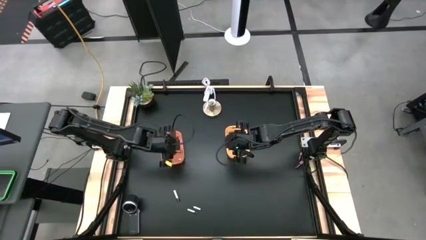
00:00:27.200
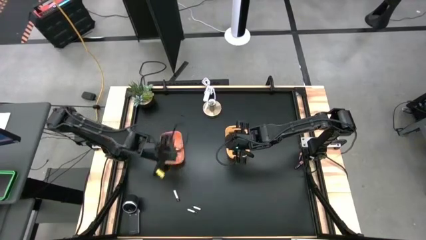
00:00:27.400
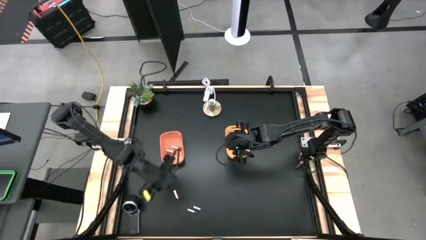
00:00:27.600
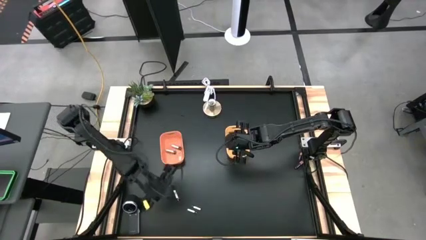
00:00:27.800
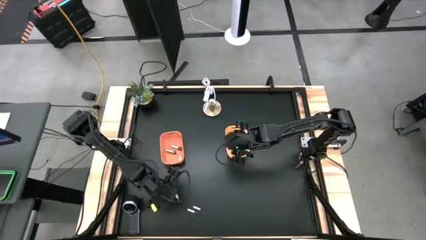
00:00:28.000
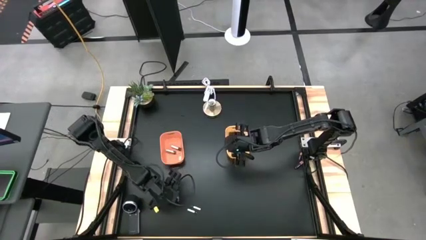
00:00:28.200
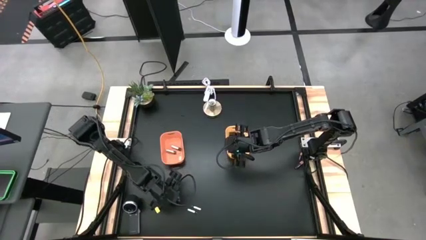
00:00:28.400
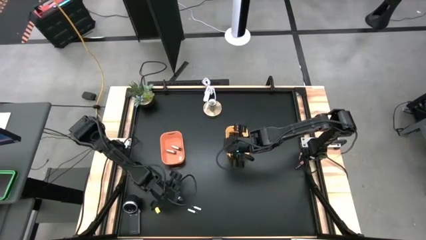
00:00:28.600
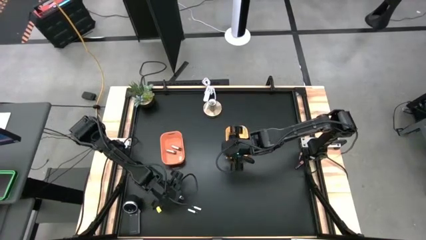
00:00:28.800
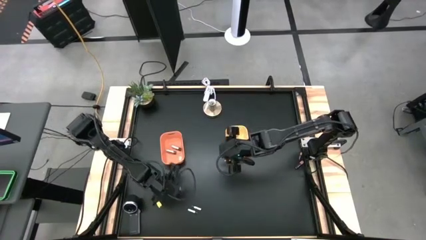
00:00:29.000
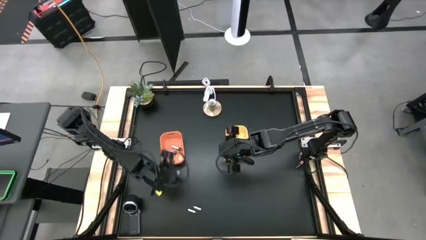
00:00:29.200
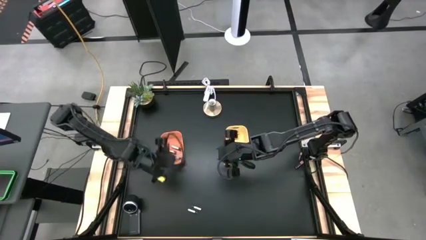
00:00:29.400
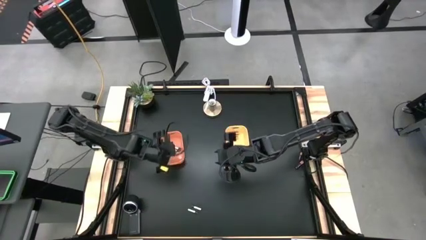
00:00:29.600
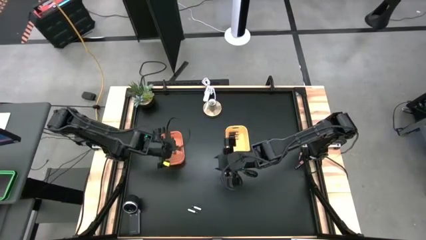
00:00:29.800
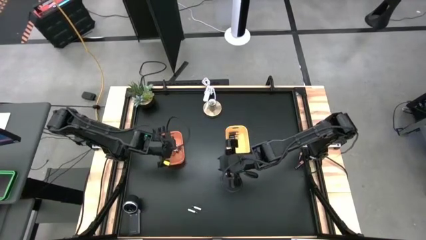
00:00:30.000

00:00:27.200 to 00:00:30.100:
Task: Sort batteries
Put the silver battery into the orange bin

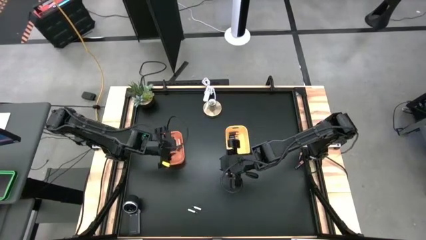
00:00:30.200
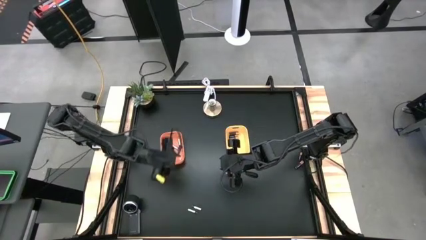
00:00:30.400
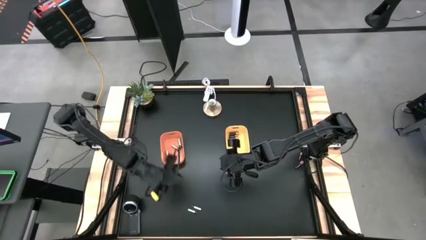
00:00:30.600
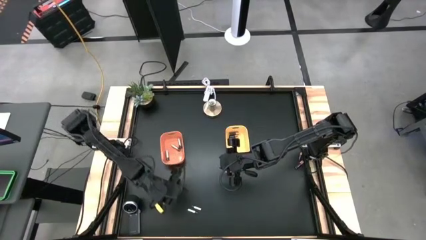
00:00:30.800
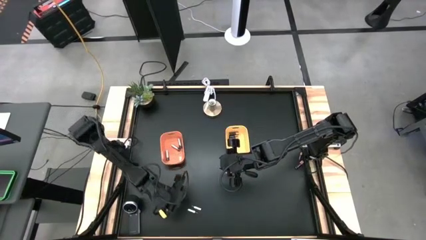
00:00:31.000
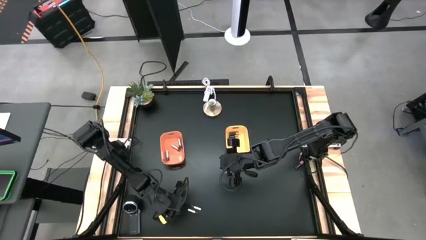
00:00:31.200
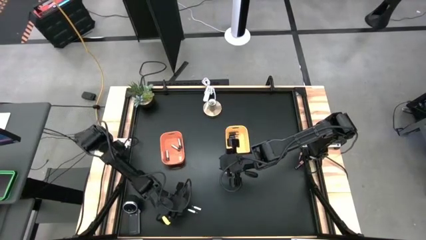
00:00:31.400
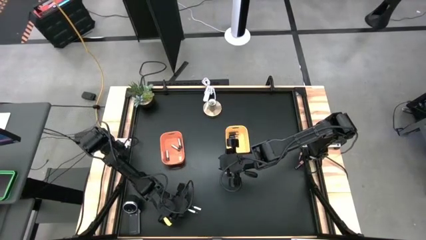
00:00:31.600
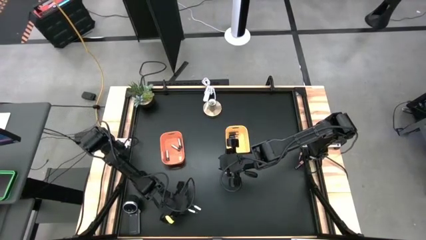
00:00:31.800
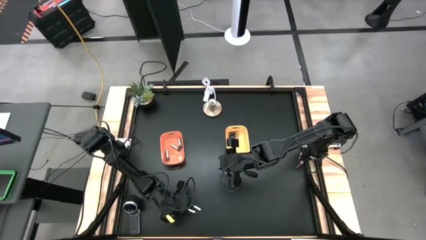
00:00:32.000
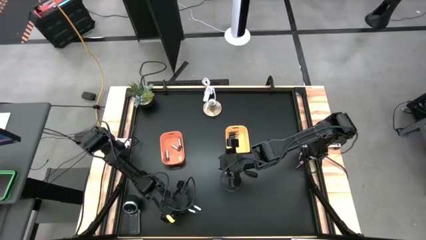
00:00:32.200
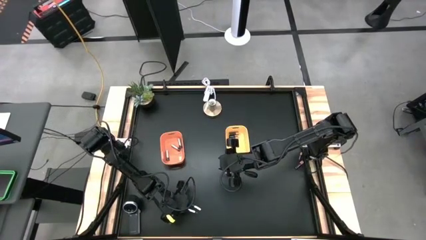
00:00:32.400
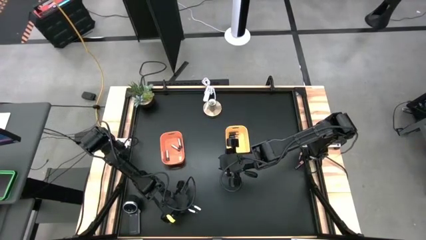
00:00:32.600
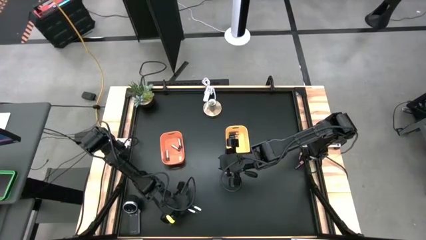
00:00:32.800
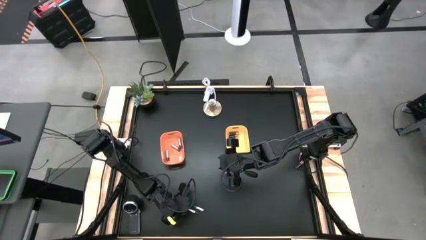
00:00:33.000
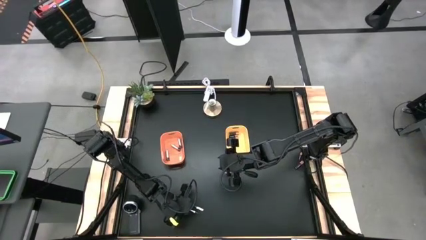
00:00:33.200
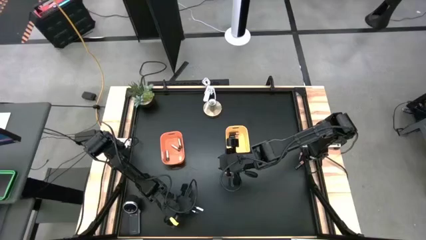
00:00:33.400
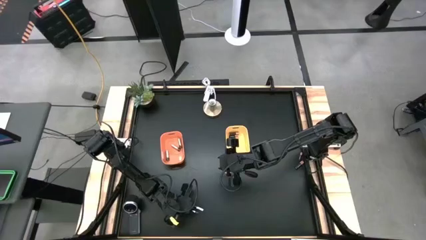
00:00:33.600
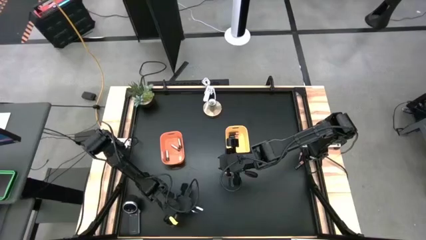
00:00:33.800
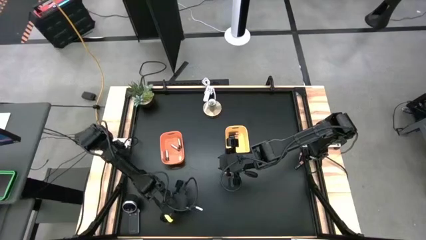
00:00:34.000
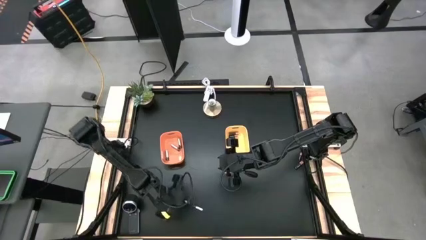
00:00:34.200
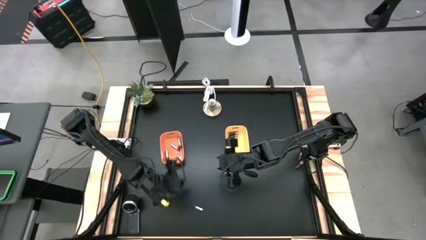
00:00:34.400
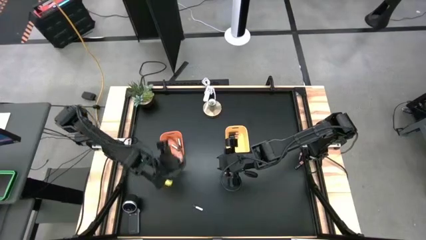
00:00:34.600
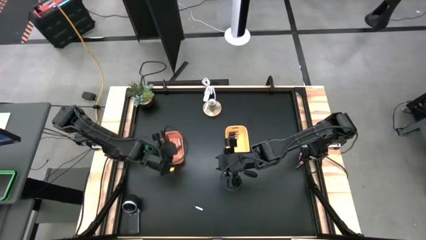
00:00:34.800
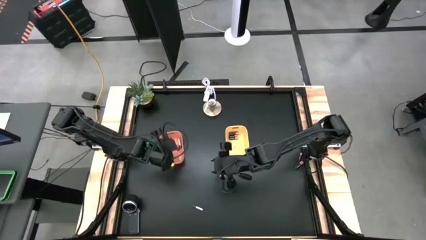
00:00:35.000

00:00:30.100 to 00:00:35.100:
Put the silver battery into the orange bin

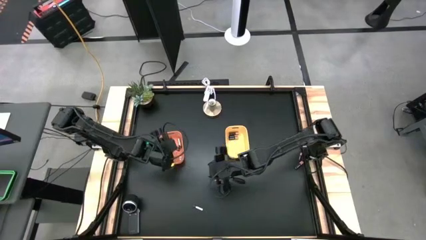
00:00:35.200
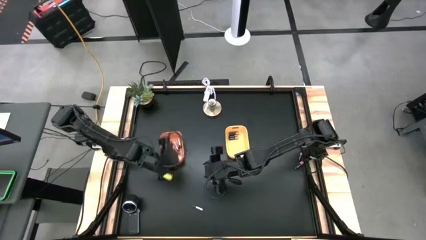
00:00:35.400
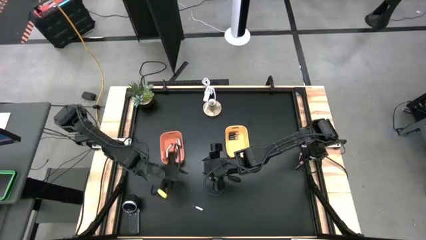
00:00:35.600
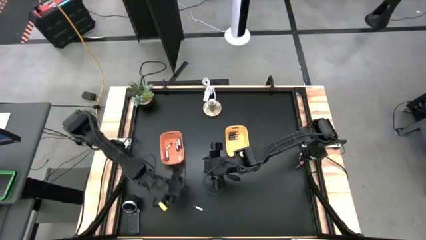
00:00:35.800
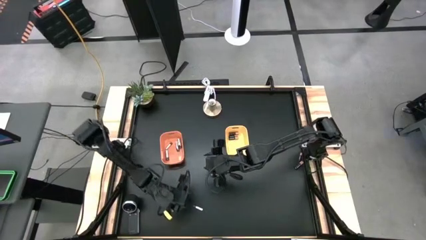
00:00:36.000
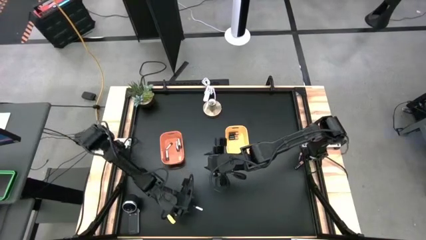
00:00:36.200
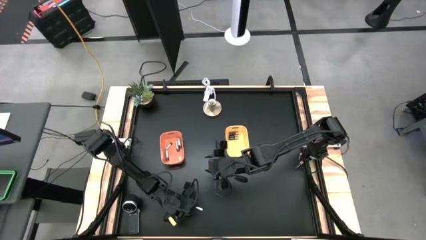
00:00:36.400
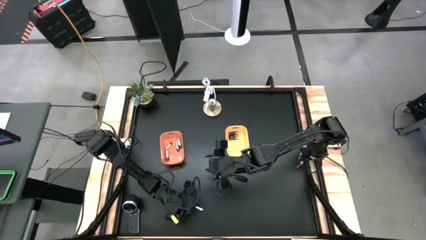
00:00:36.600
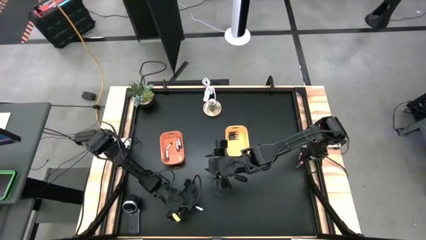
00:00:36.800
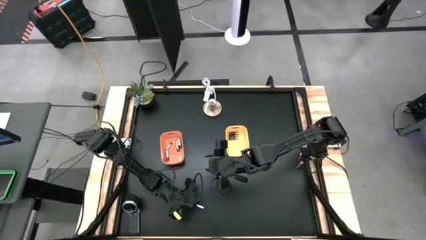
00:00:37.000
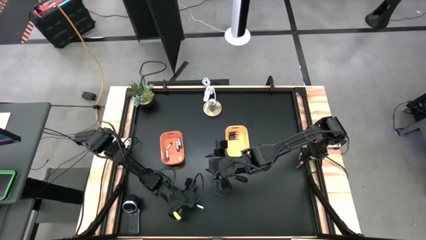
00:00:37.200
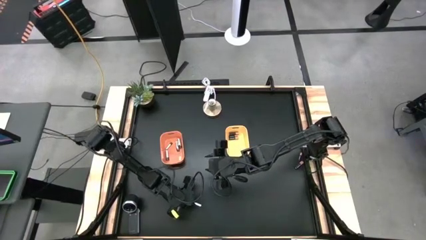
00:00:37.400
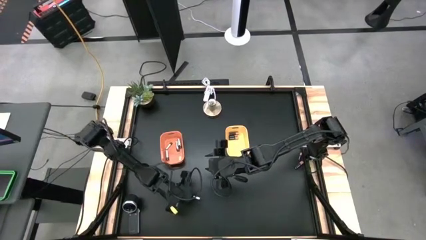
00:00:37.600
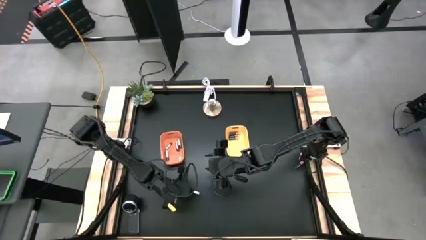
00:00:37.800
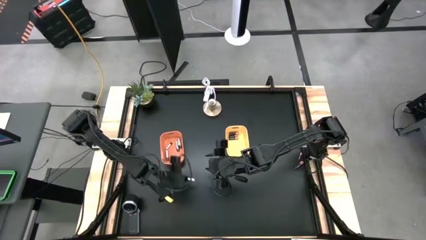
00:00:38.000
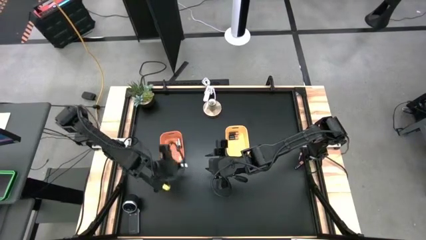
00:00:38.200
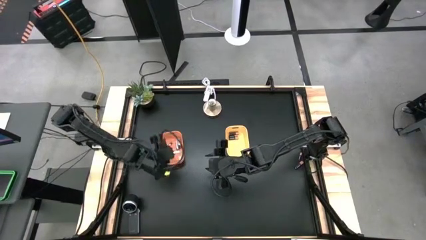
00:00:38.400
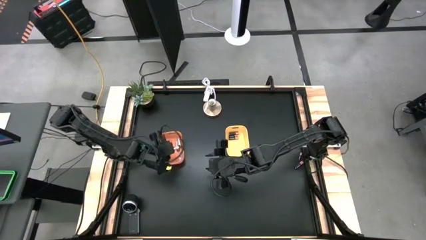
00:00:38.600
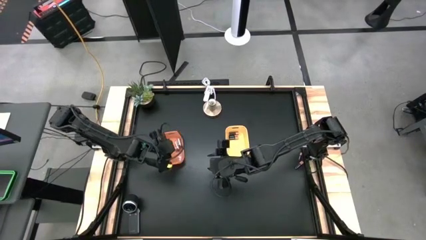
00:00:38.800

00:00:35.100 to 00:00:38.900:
Put the silver battery into the orange bin

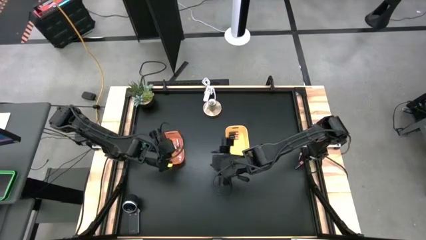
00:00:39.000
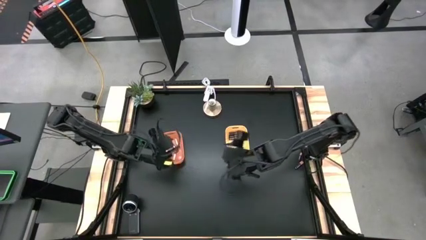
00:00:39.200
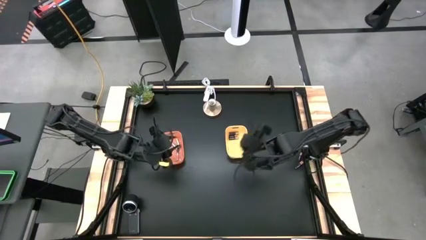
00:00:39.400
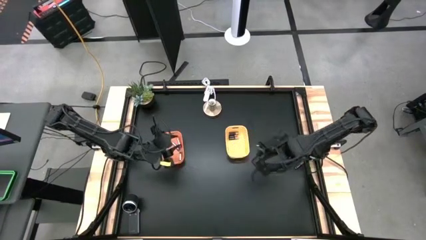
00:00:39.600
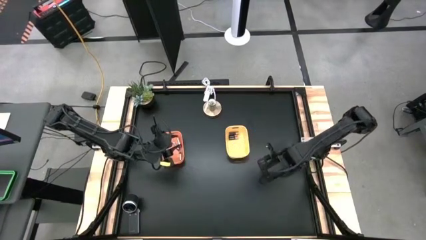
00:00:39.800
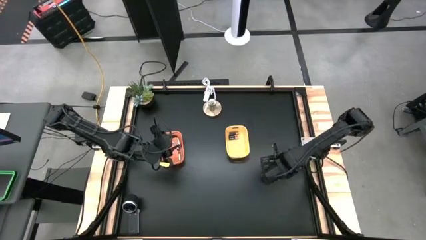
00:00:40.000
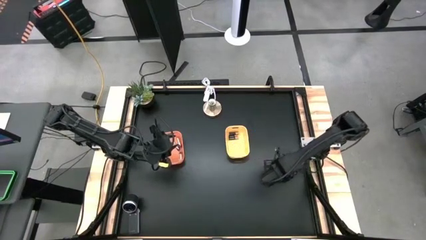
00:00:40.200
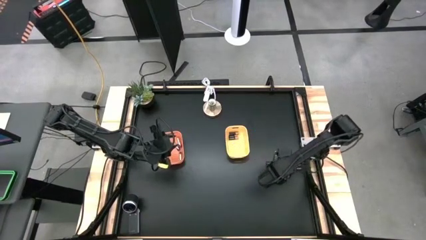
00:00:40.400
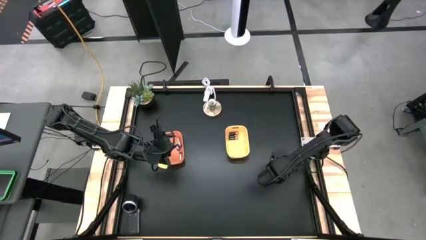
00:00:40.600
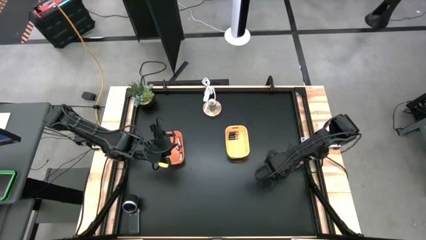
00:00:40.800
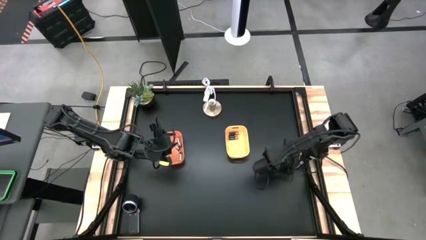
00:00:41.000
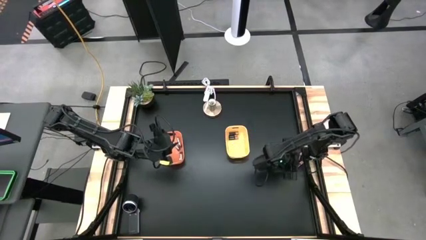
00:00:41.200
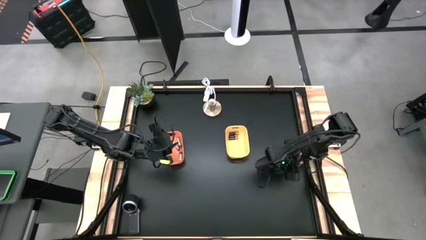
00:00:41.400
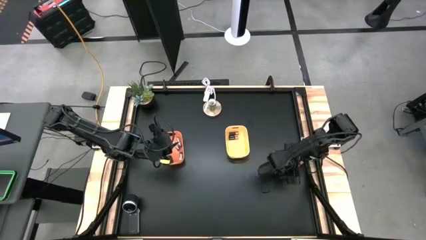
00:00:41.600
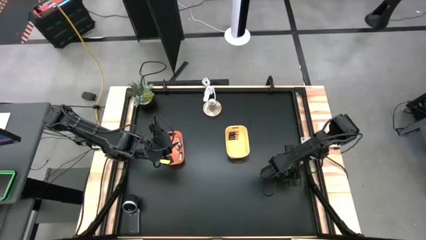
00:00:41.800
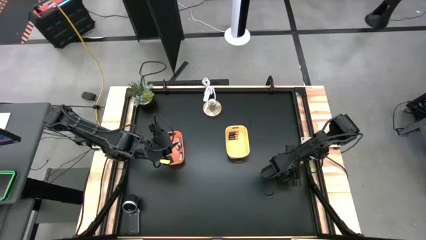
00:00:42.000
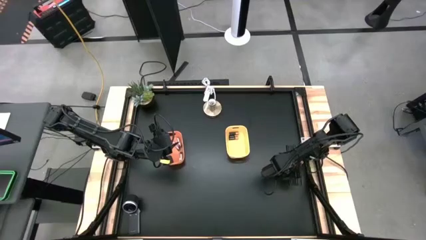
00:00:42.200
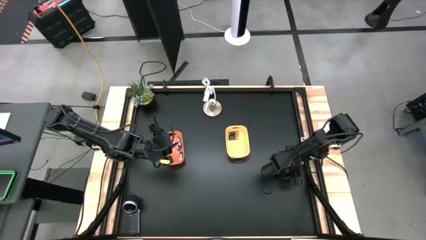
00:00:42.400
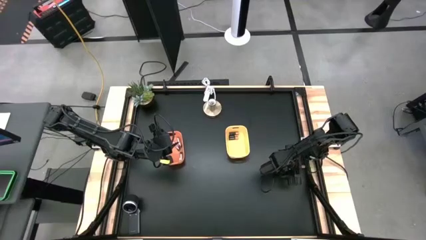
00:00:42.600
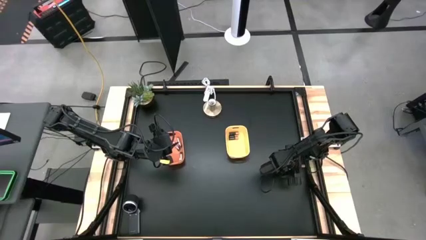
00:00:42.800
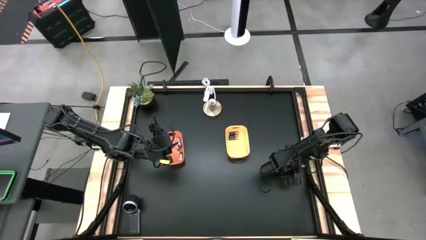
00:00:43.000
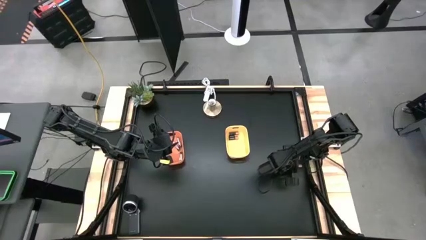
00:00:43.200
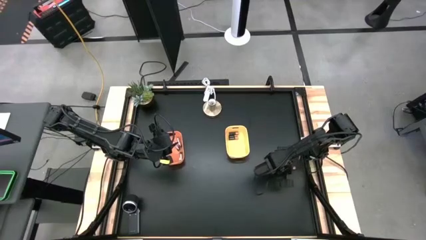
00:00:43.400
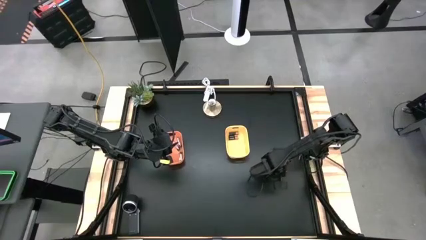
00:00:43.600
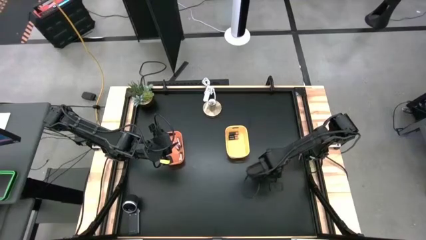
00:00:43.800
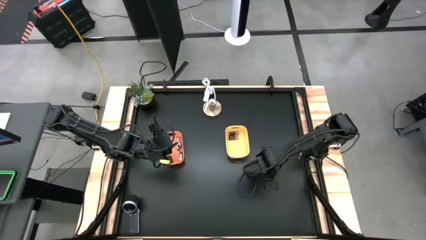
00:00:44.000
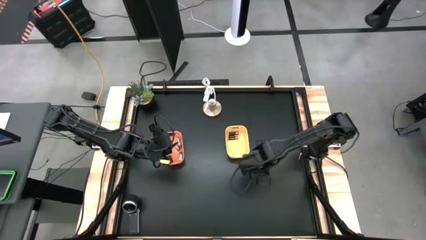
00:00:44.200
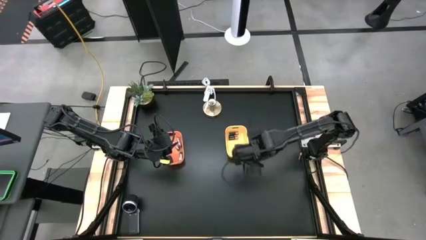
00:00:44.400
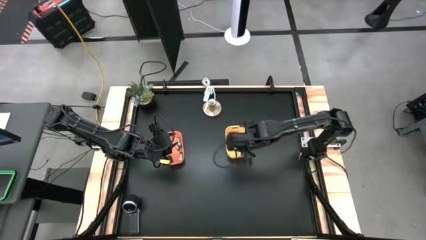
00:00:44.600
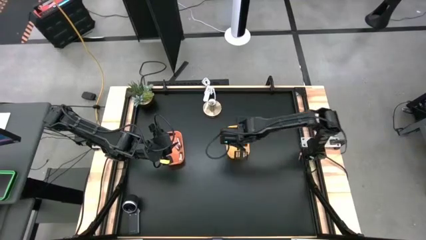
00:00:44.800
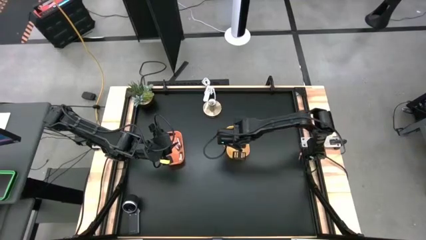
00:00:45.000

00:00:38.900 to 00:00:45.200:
Put the black battery into the yellow bin
